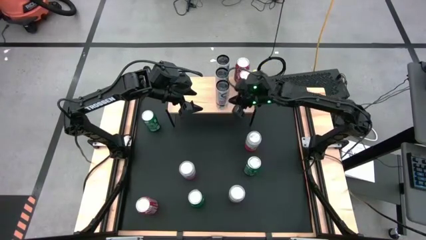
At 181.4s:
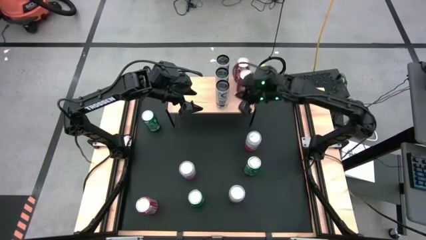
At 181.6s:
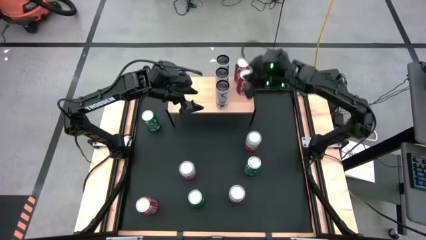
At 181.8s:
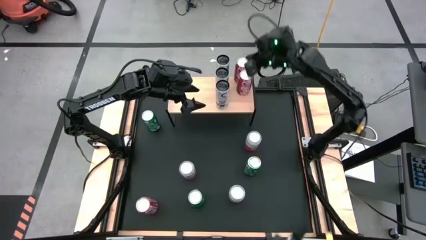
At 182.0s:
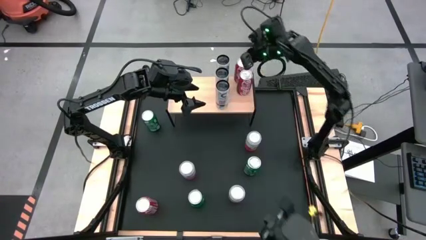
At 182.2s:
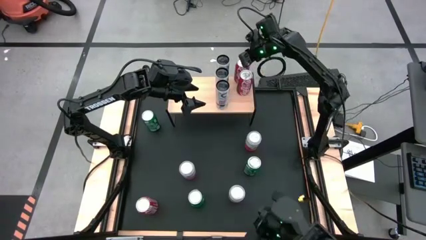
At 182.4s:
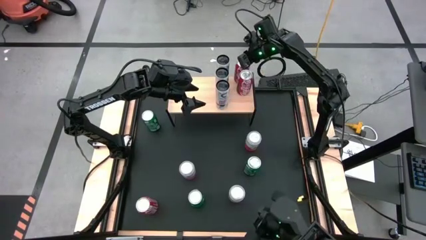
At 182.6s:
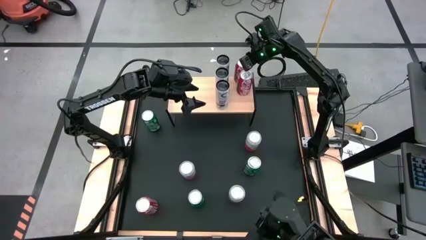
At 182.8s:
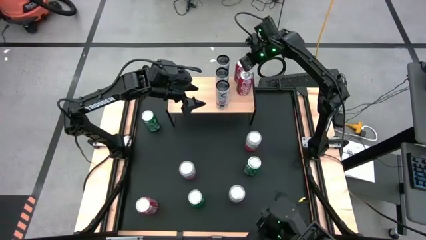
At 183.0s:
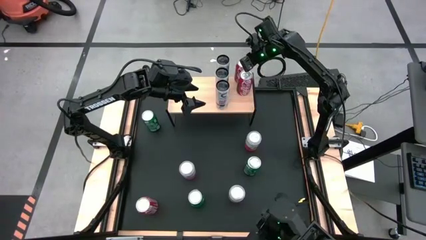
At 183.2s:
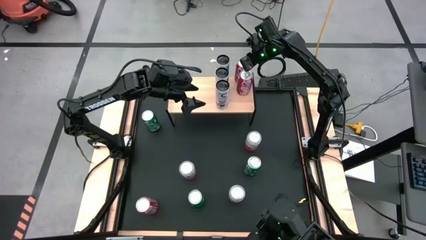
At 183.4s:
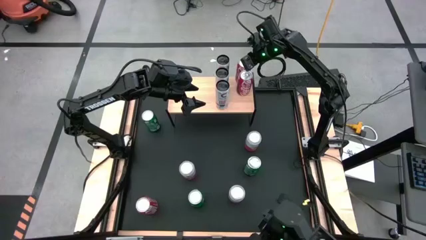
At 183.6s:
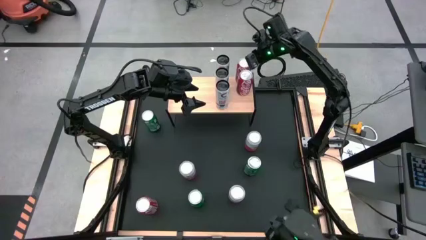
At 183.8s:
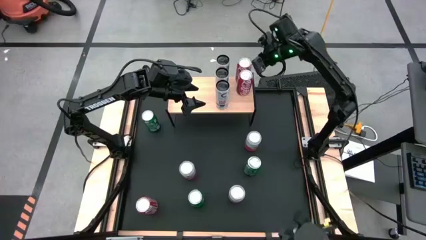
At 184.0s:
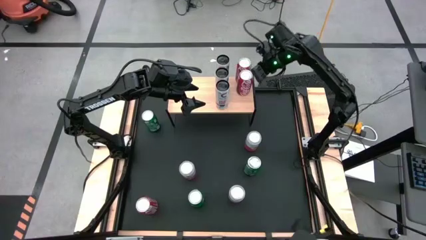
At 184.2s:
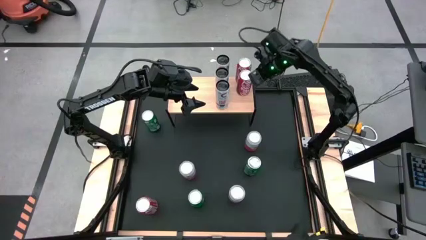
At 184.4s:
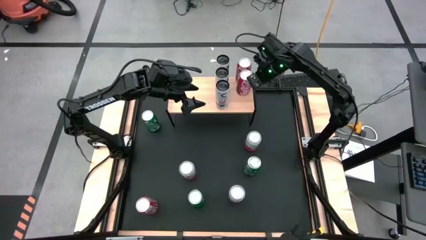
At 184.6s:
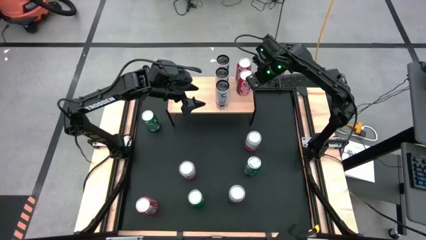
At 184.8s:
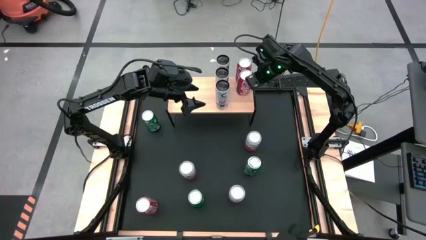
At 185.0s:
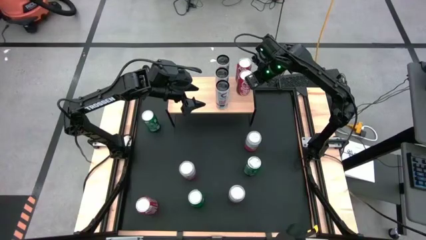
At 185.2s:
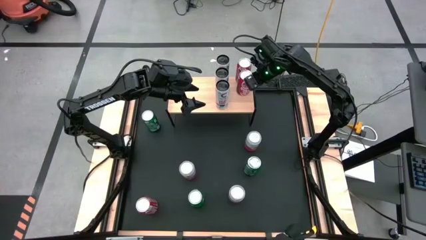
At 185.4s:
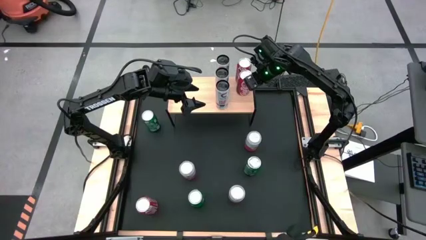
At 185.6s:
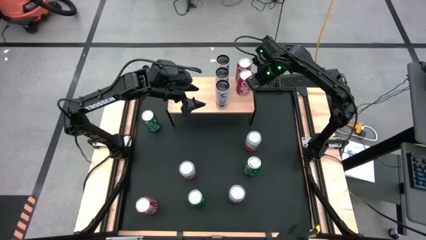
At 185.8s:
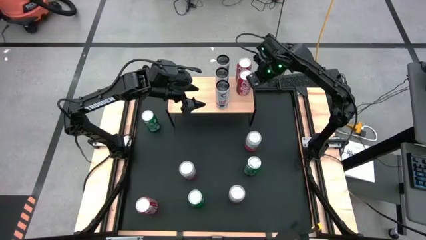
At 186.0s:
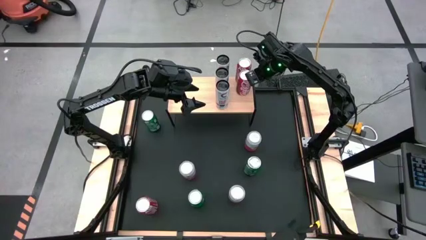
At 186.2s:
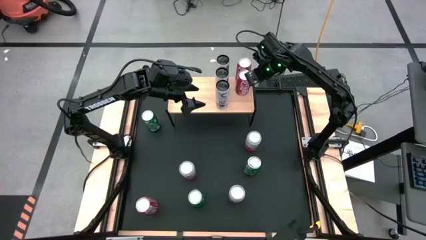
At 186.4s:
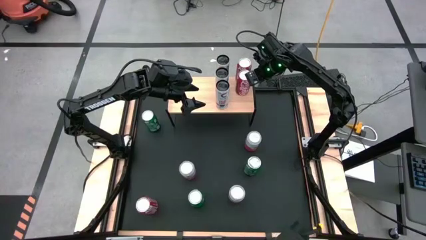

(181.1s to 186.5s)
Task: Place canned beverage on shelf
Adjust the red soda cans on the shelf

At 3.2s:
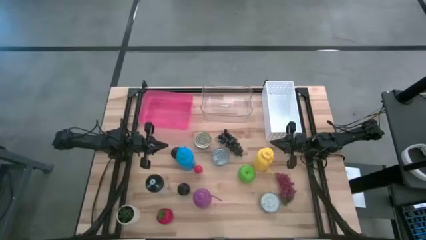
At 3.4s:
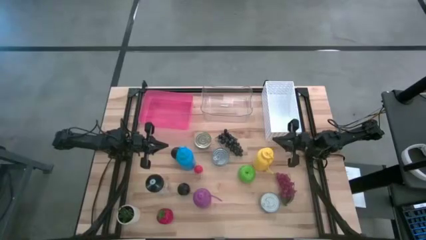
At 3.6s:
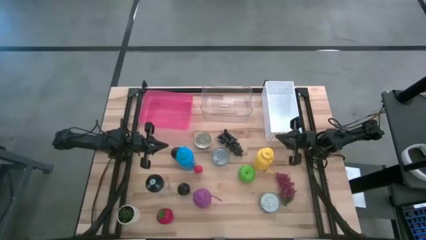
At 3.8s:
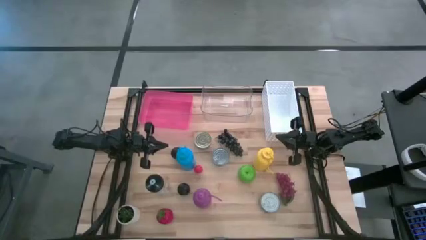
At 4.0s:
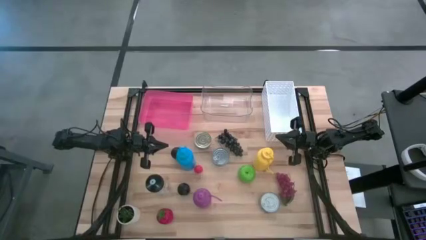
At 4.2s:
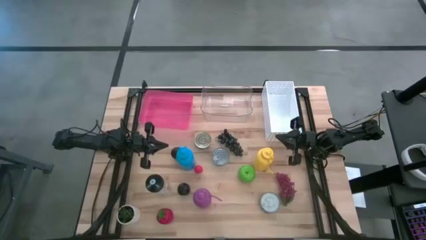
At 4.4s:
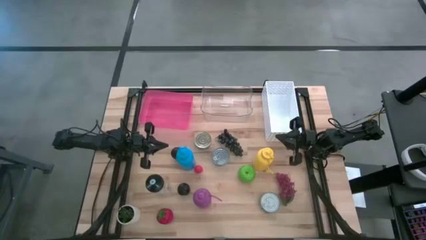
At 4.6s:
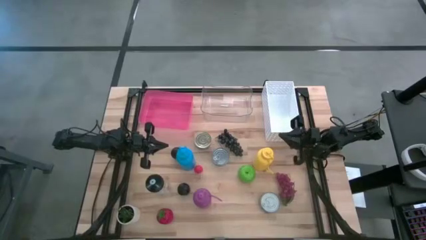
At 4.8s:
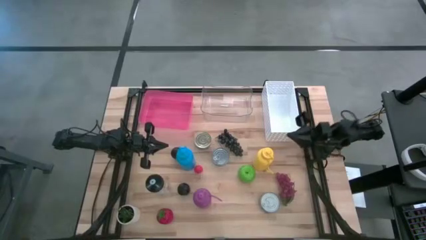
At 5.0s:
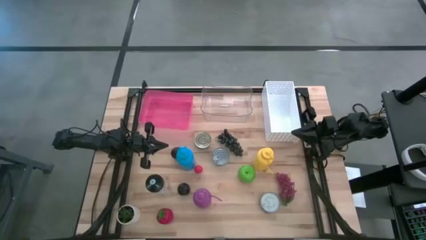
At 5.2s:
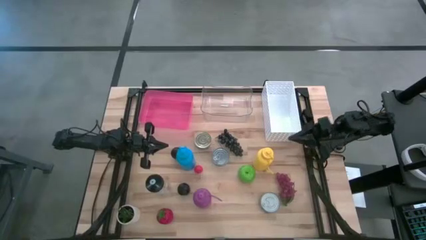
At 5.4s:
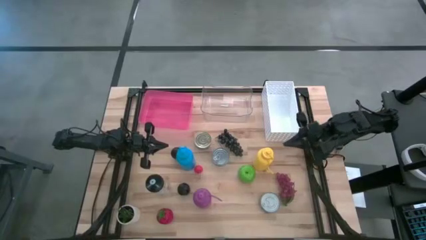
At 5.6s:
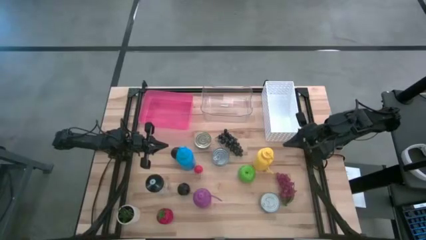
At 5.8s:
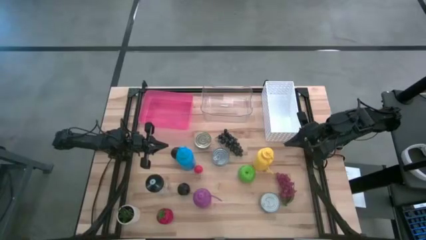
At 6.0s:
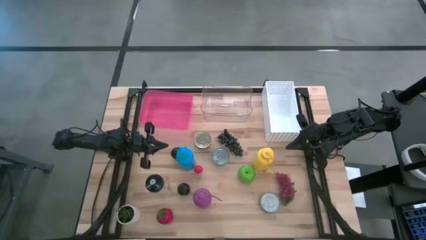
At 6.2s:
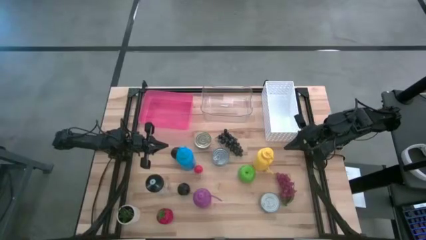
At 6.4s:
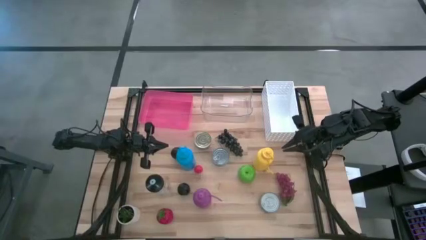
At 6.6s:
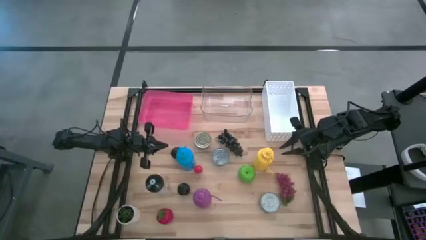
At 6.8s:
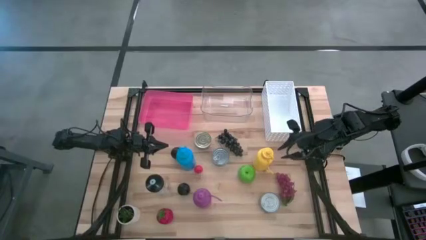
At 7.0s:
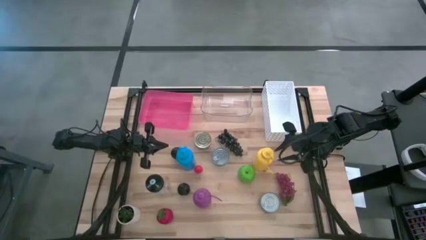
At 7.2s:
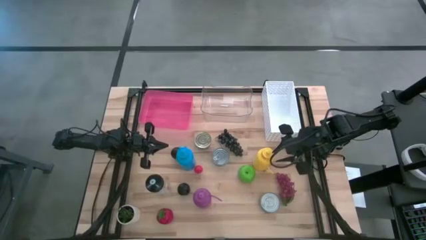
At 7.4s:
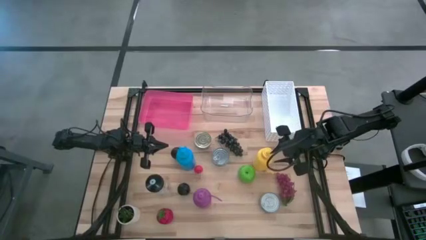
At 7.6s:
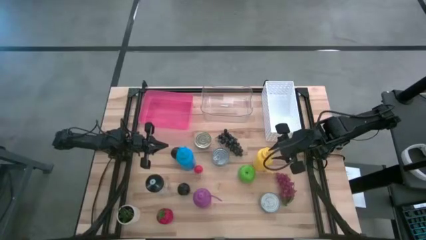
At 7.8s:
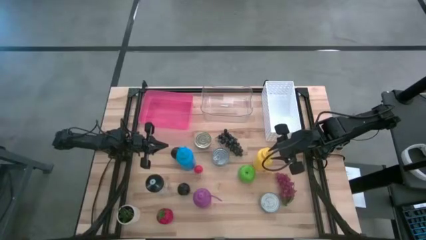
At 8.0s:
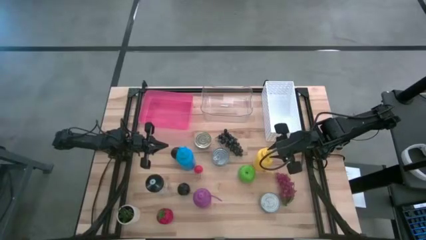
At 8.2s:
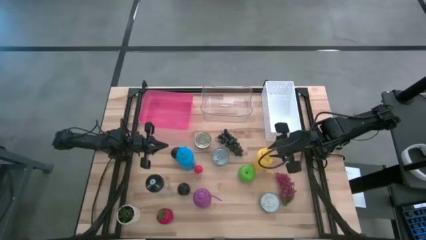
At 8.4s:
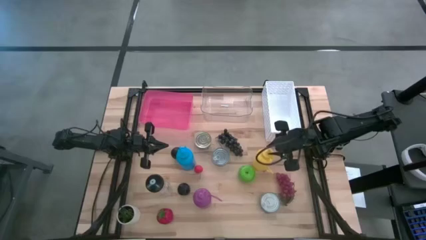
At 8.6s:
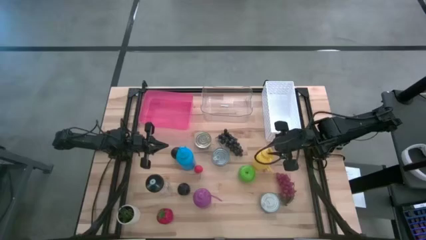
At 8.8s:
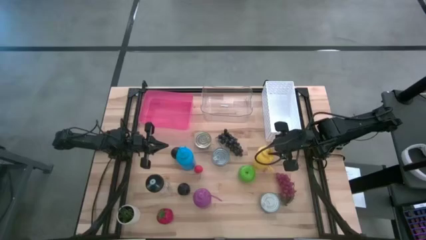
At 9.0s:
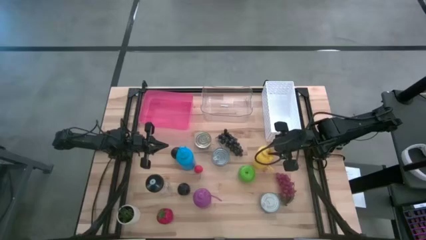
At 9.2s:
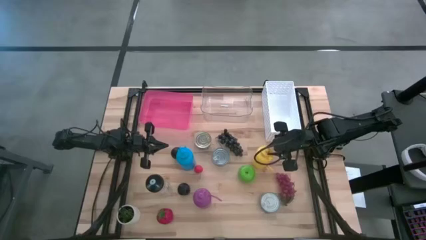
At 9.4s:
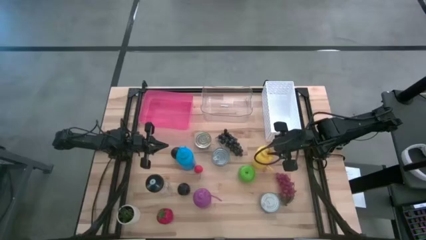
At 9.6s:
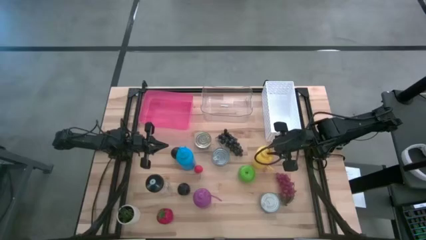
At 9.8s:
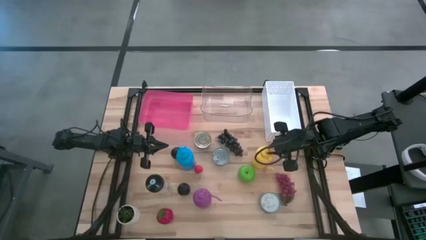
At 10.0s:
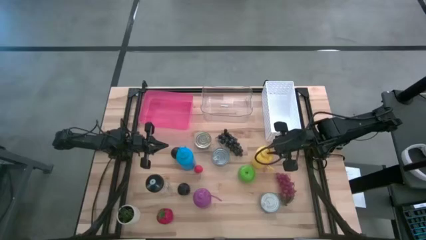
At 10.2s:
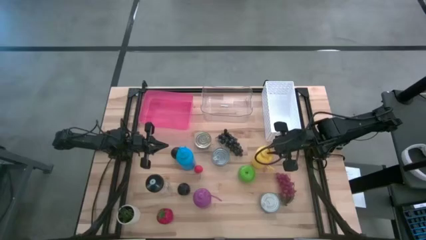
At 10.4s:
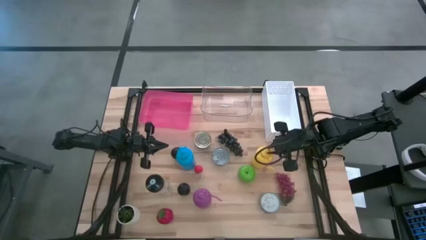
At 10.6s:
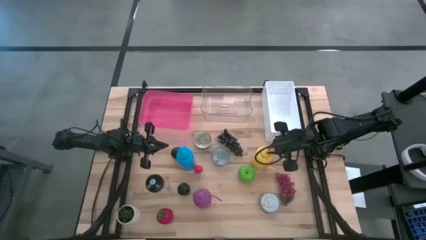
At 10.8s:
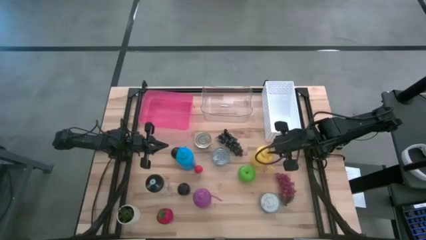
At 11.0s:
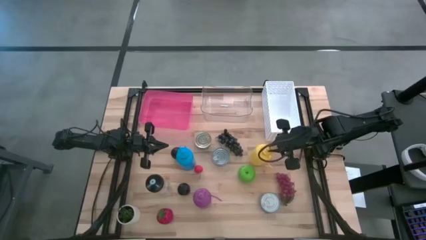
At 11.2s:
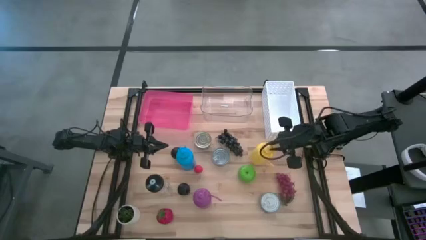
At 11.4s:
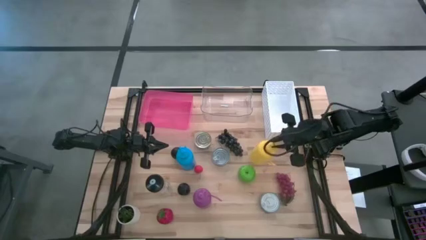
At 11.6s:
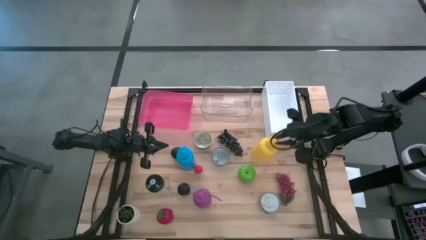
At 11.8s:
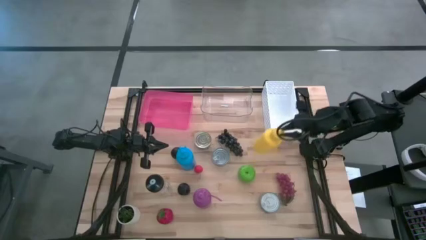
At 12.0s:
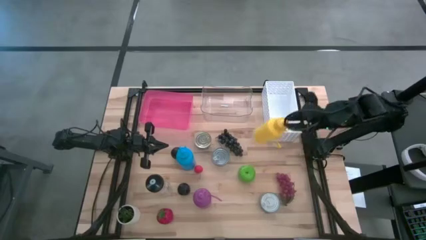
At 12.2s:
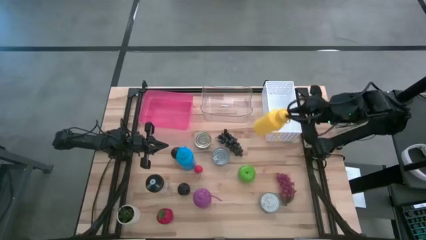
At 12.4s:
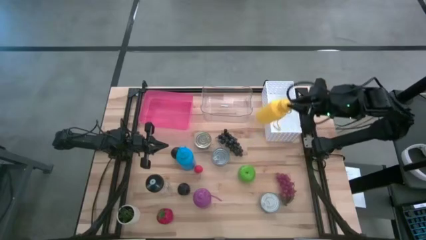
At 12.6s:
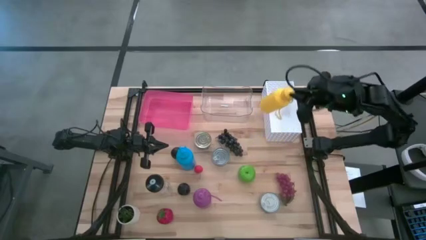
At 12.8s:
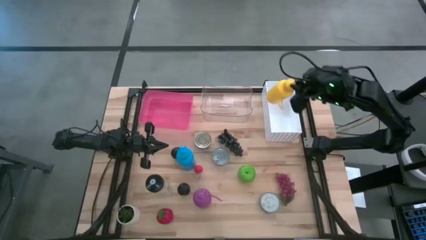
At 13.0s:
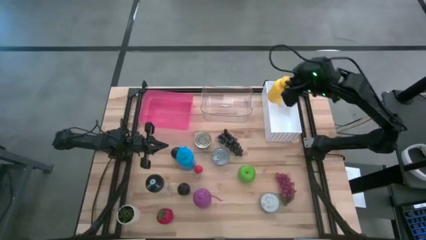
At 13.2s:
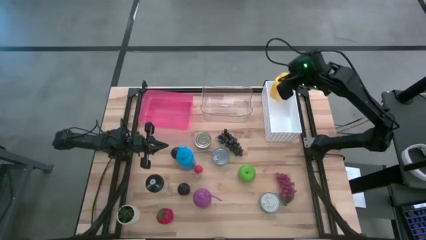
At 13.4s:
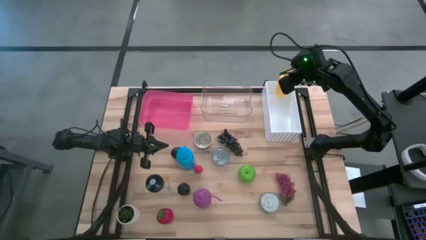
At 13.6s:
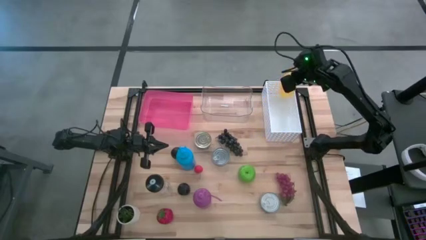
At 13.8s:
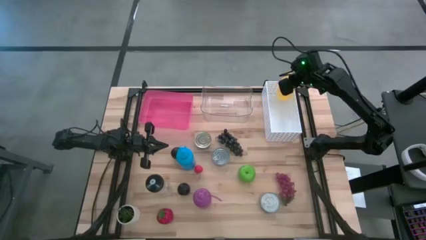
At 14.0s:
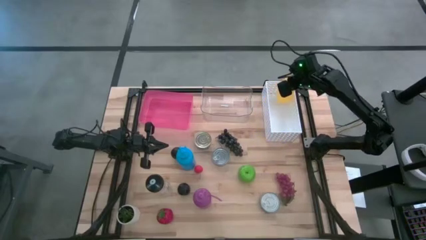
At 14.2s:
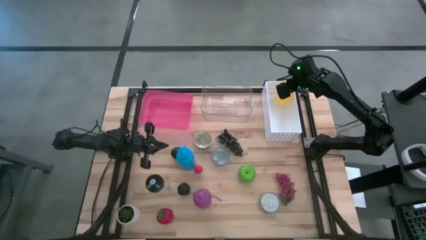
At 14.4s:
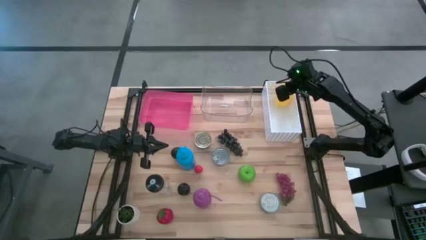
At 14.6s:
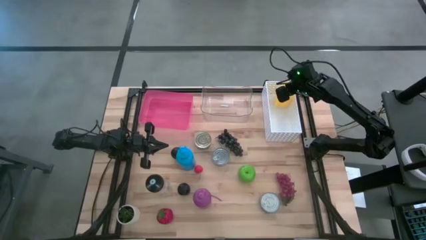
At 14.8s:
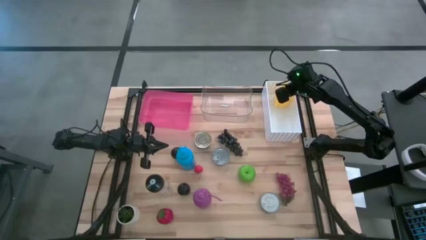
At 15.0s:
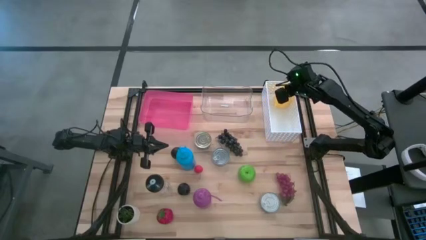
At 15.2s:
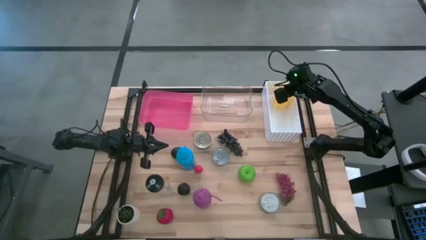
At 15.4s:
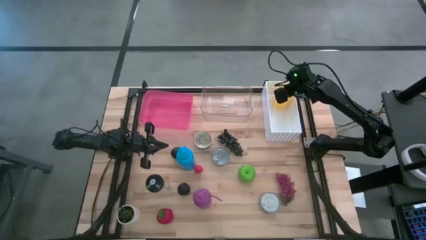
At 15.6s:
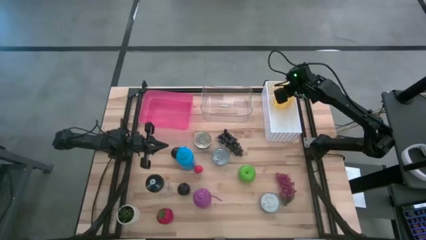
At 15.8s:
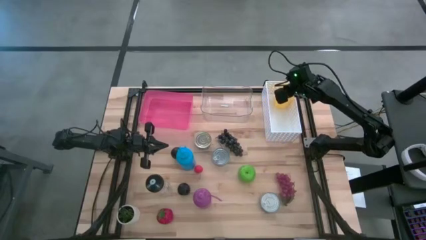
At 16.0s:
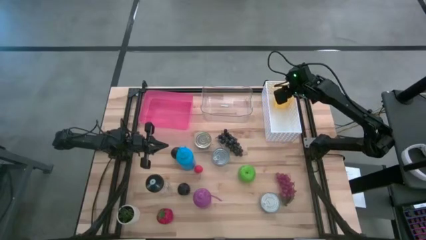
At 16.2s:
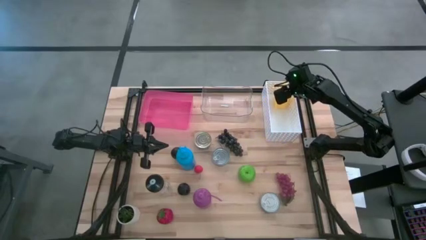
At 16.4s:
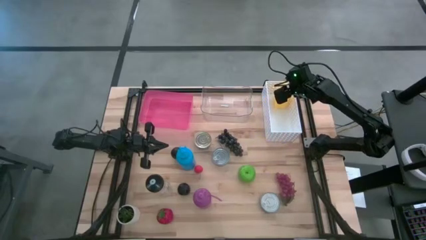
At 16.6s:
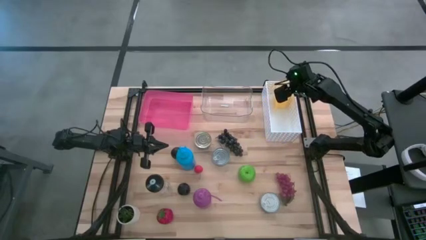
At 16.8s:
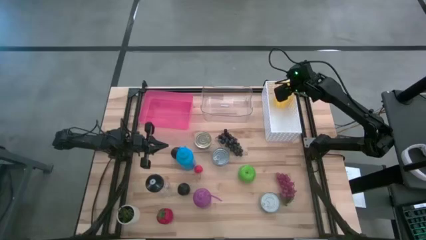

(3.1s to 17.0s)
Task: Pick & Place Food Item
Put the yellow water bottle into the white bin
